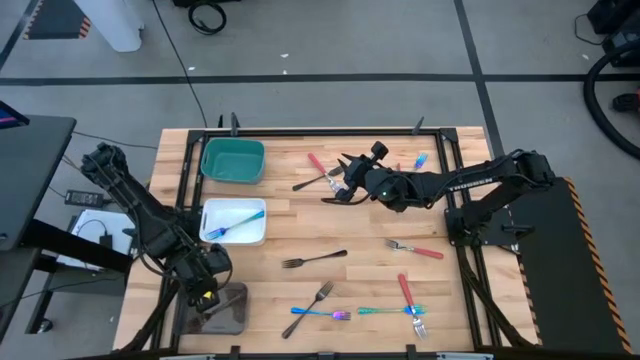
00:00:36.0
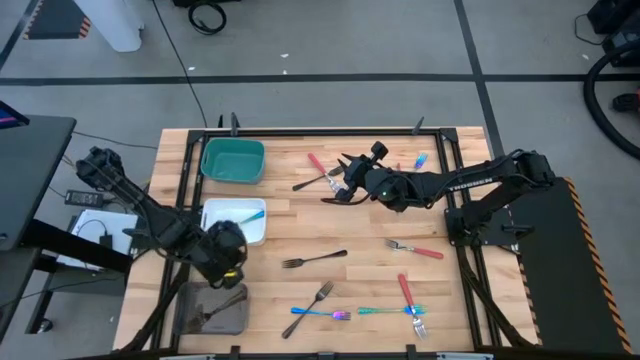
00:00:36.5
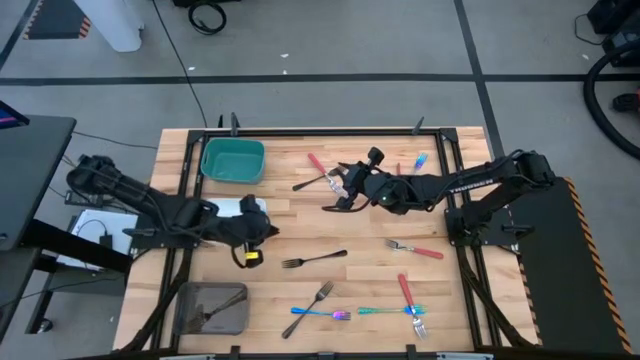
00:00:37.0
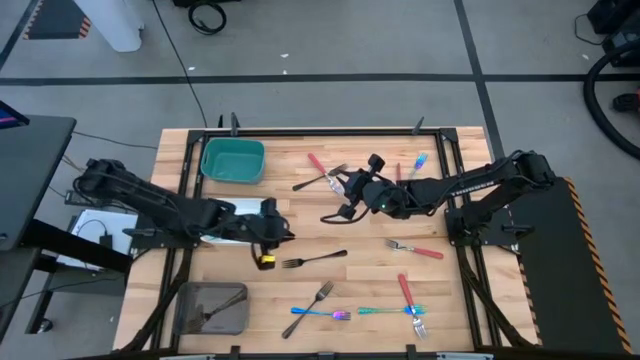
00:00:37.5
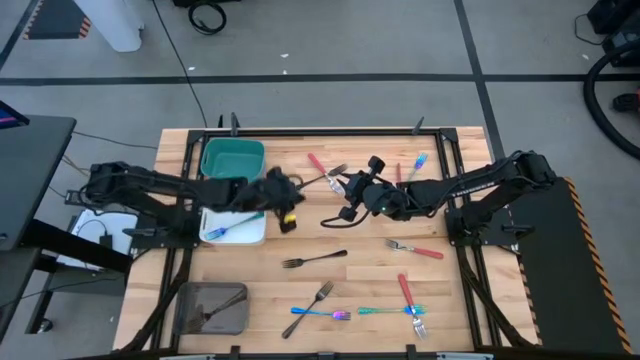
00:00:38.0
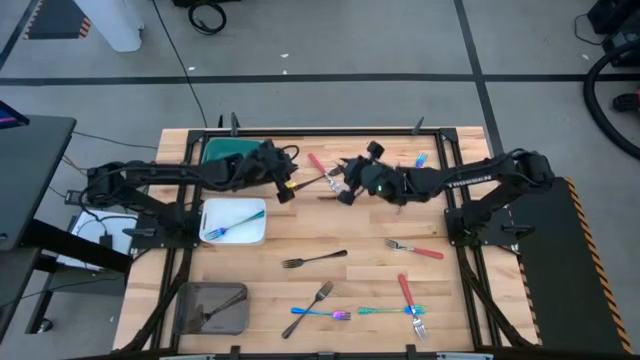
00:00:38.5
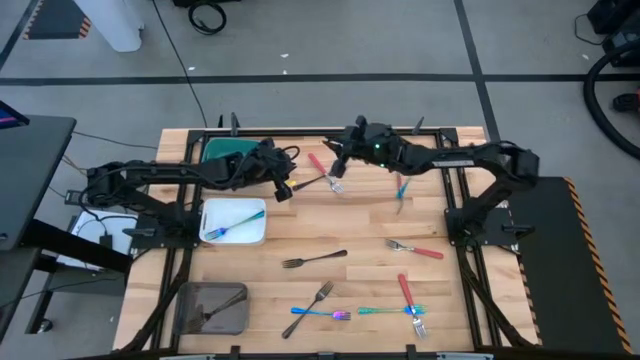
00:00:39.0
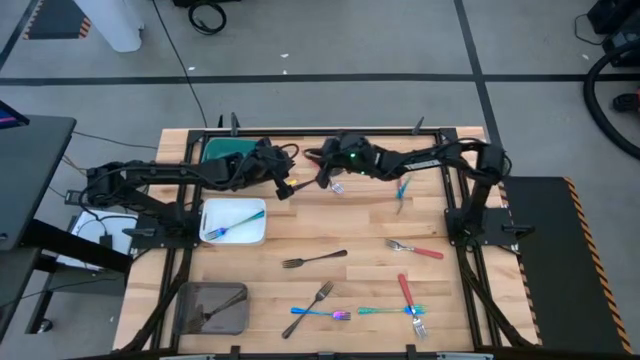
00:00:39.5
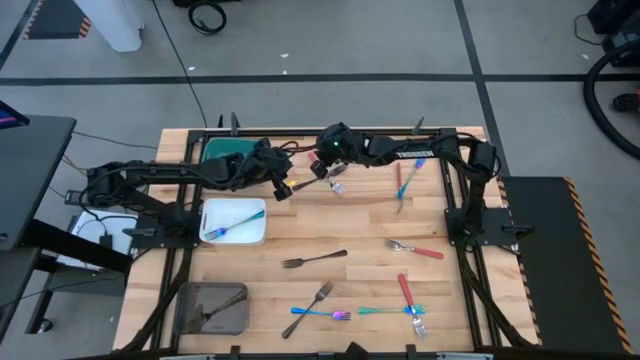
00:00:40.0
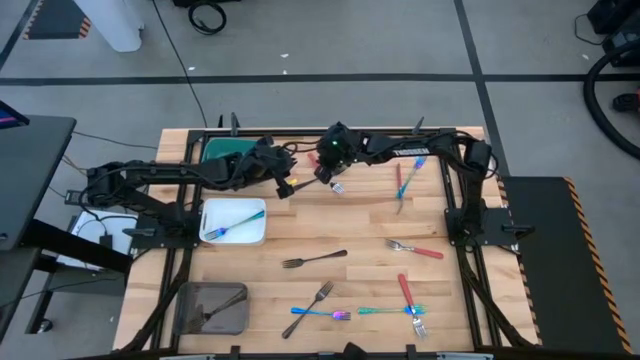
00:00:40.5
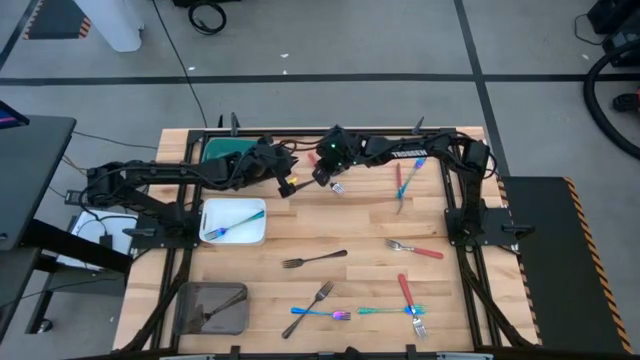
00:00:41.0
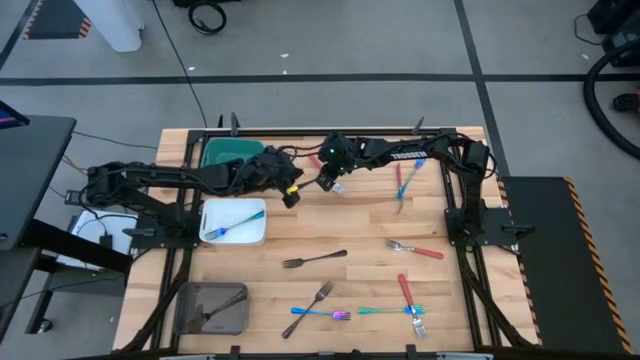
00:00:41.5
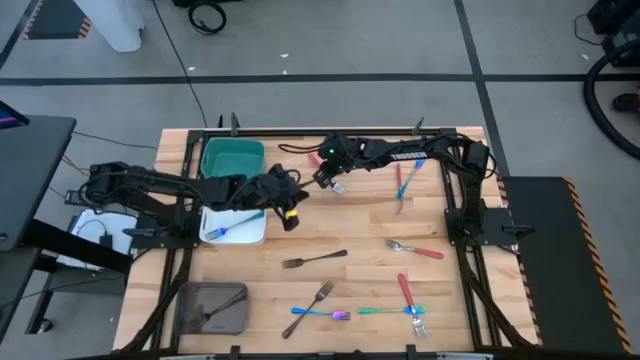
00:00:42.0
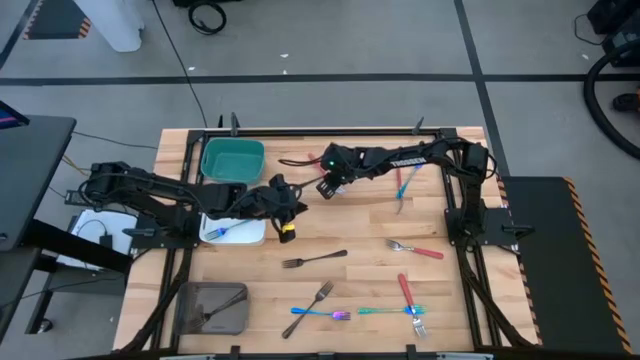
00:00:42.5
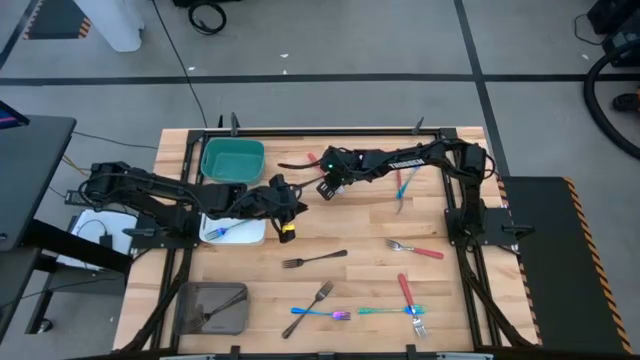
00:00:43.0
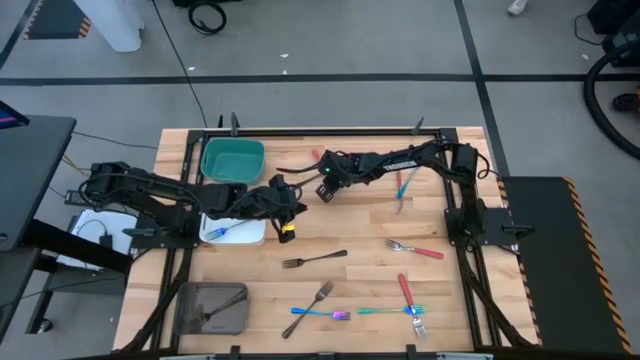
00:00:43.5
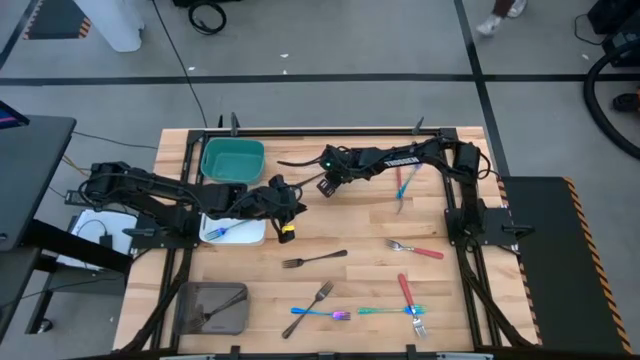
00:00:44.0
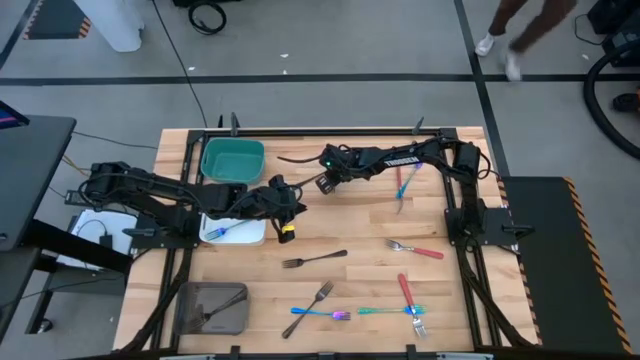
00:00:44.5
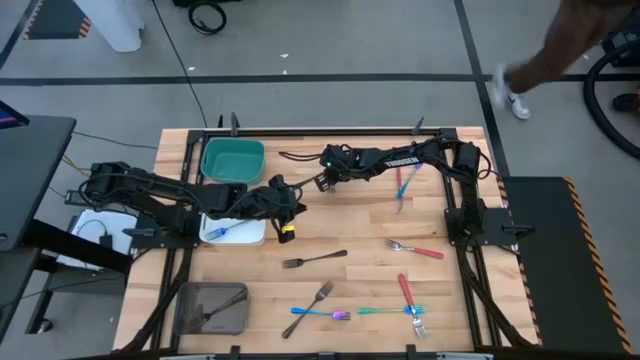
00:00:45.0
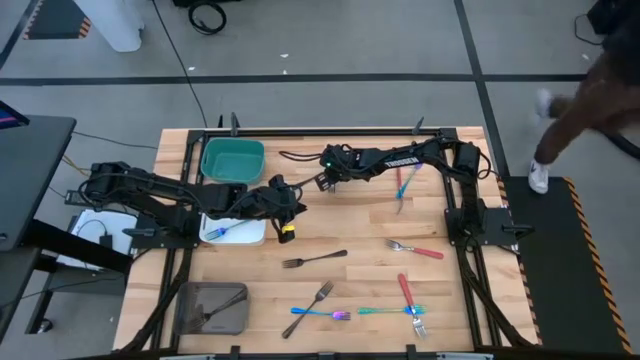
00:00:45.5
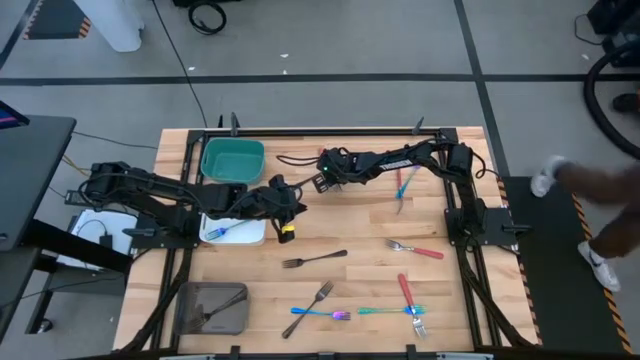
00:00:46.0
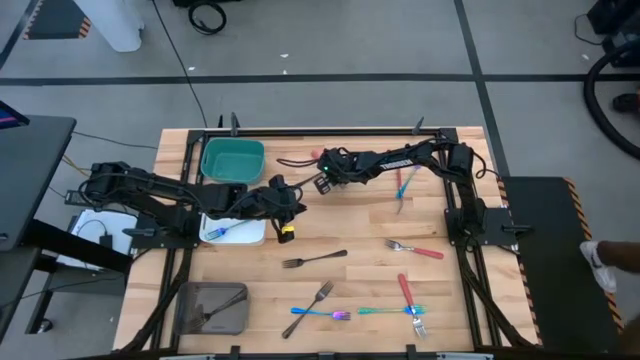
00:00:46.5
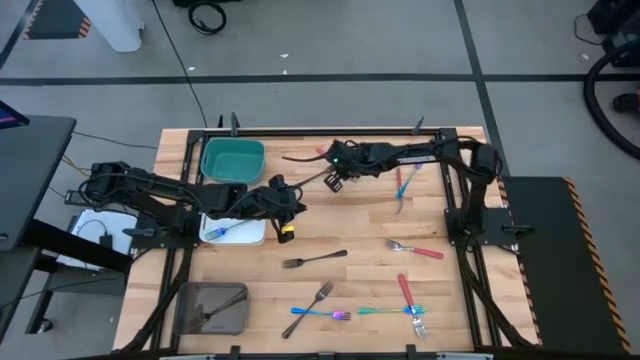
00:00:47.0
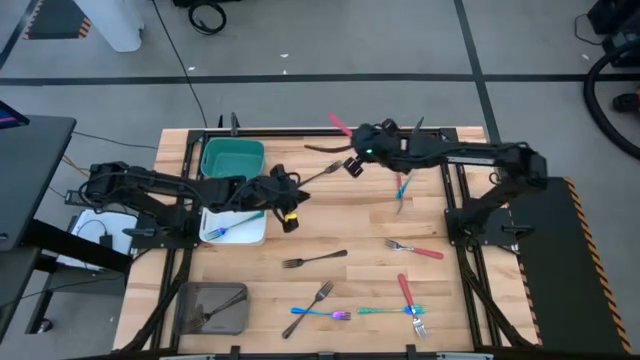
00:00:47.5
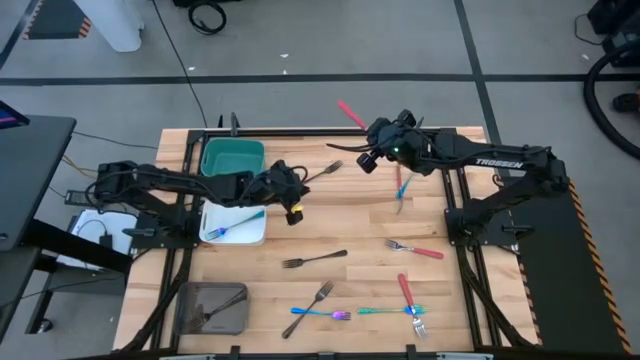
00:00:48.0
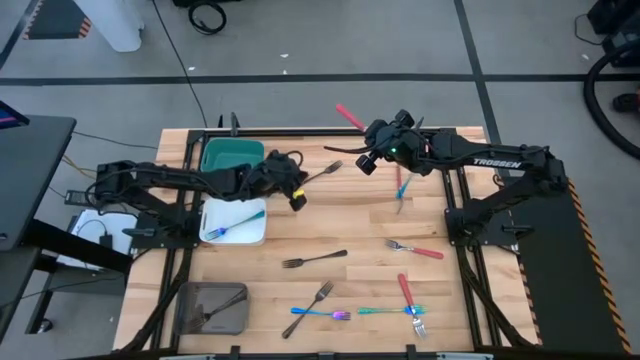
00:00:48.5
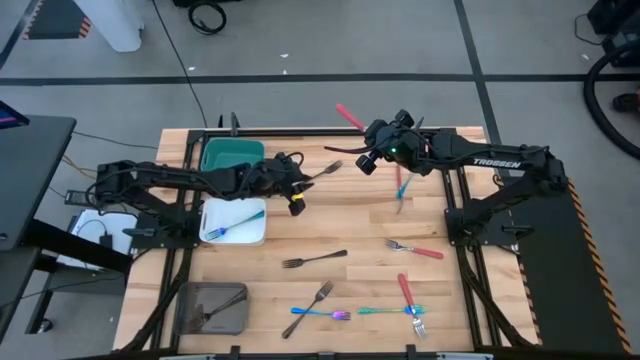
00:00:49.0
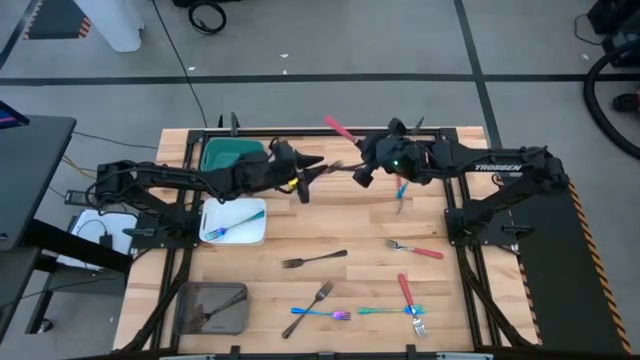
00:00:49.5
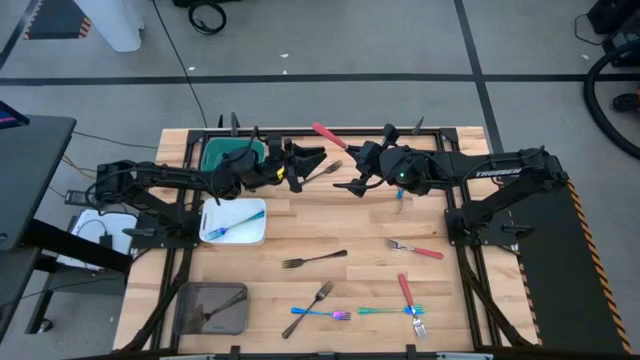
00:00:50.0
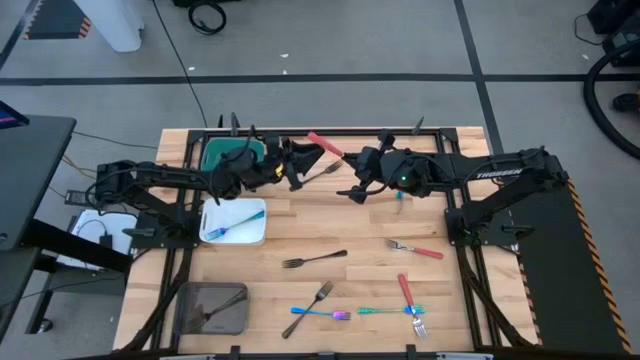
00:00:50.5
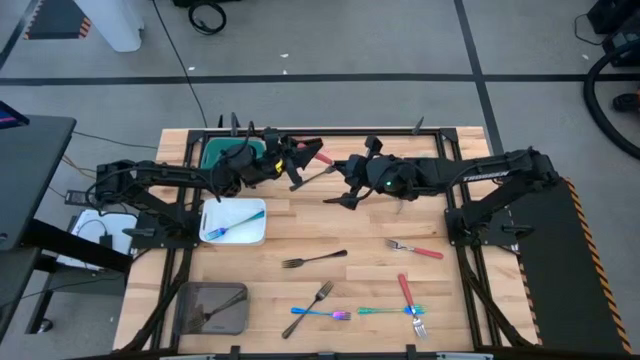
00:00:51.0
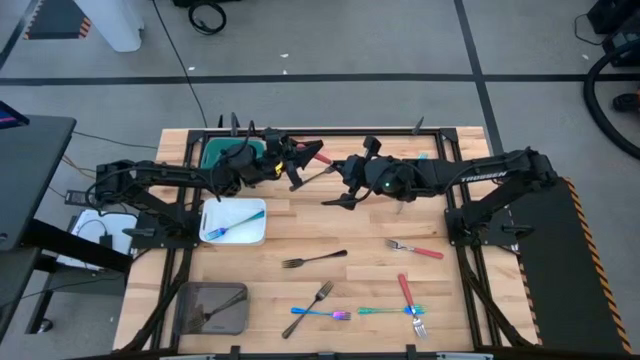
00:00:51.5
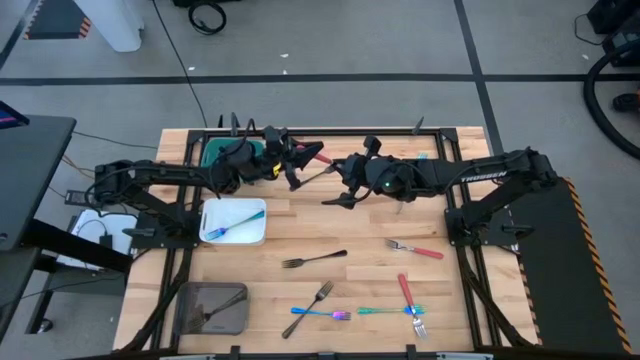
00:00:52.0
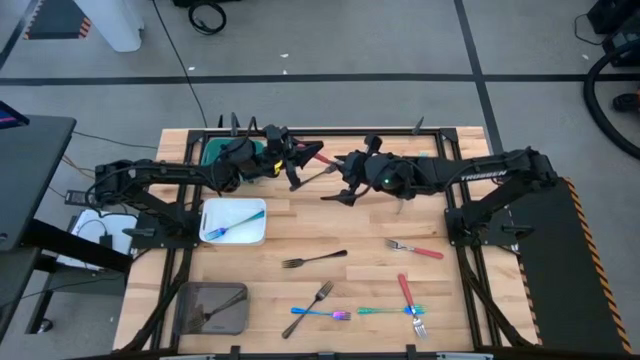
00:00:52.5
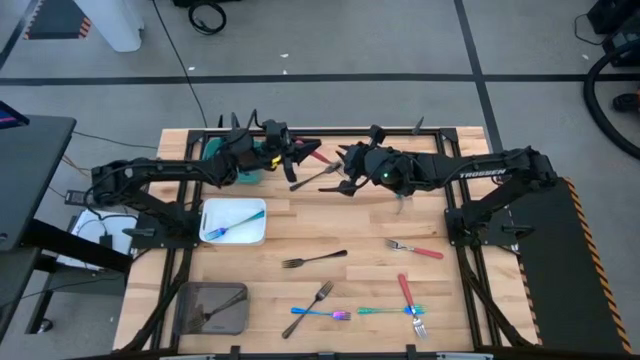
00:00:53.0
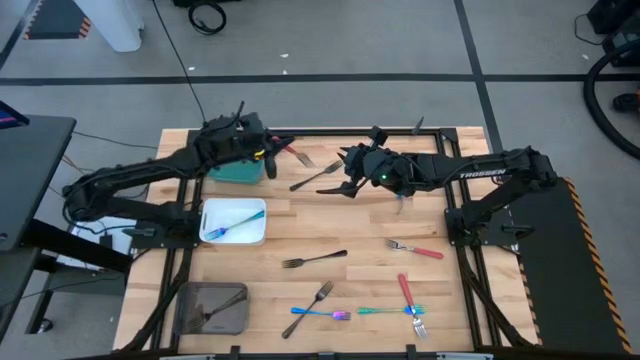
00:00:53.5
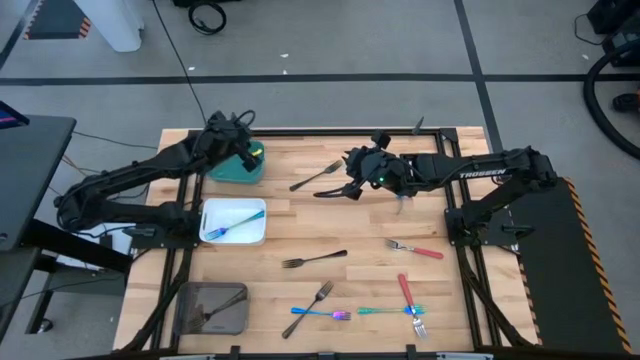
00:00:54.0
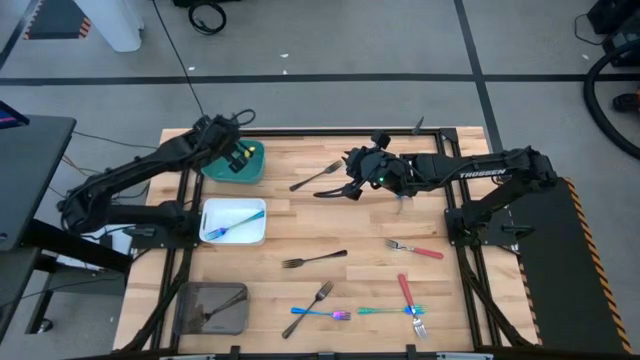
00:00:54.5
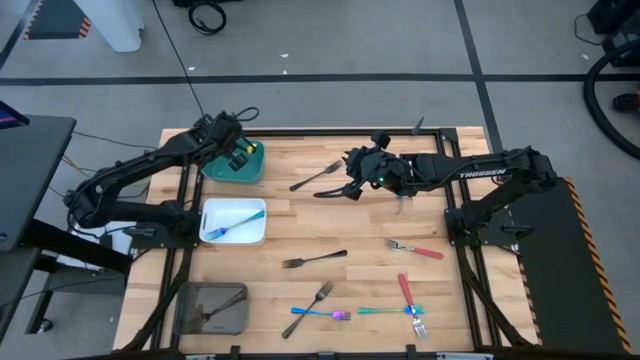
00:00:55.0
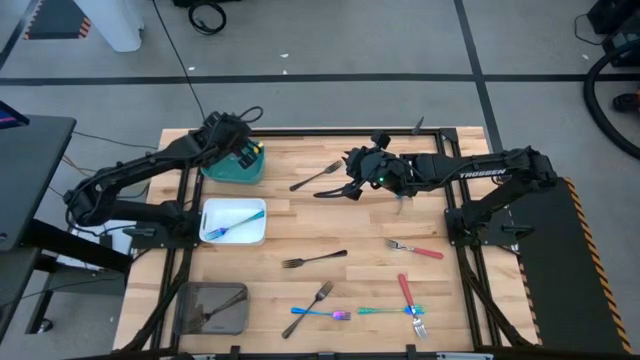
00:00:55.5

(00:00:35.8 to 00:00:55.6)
Task: Sort silverware by color (type)
Put the pink fork into the green bin

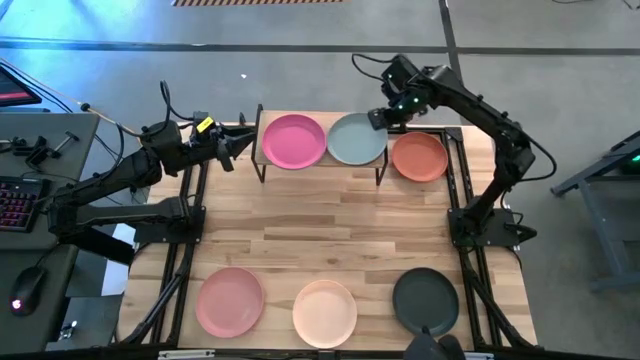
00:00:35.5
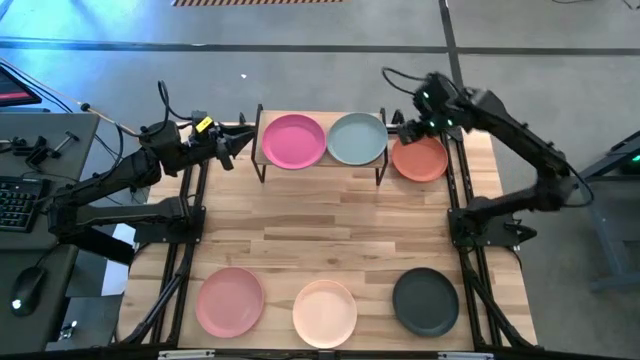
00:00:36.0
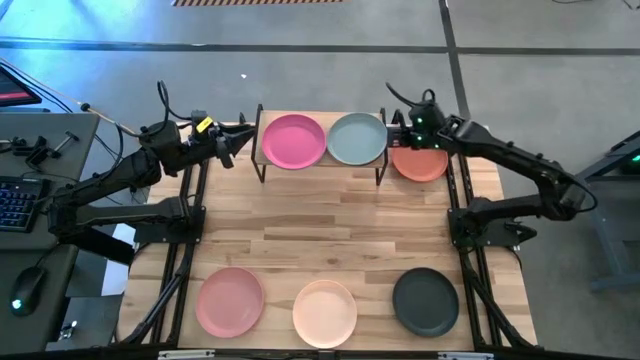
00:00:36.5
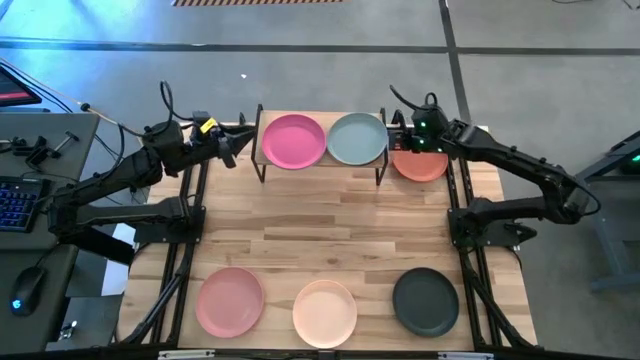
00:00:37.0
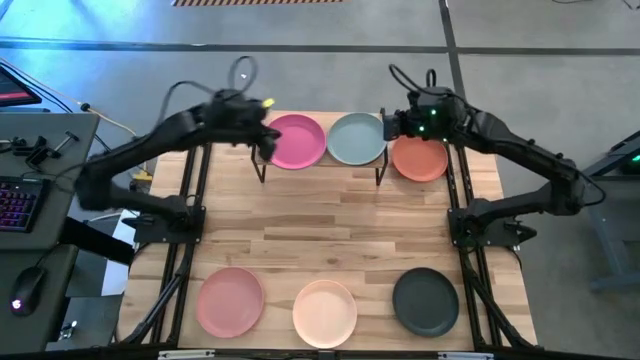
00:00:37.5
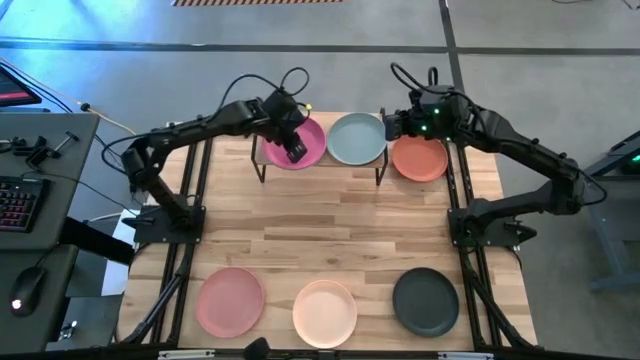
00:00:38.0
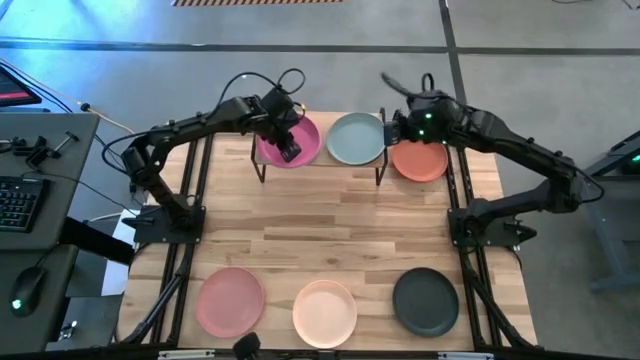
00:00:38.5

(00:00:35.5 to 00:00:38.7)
Task: Place and stack plates onto a shelf
Adjust the stacked plates on the shelf
